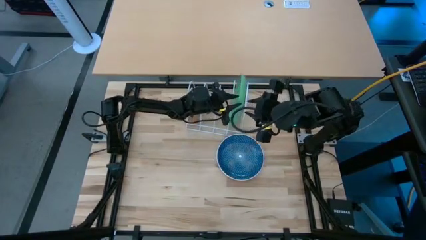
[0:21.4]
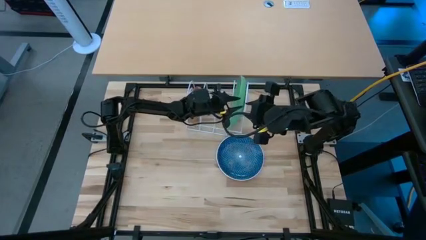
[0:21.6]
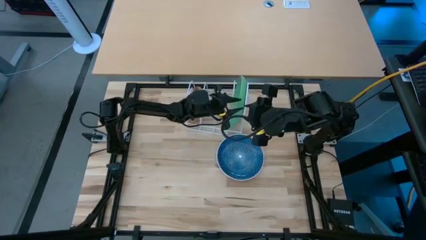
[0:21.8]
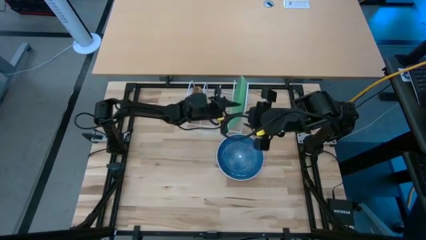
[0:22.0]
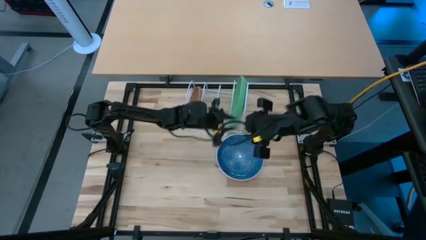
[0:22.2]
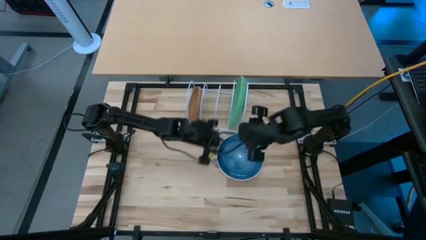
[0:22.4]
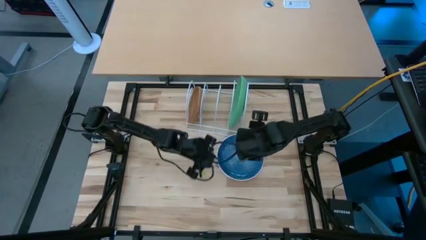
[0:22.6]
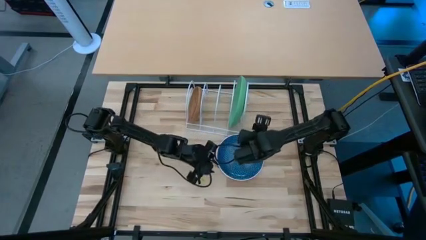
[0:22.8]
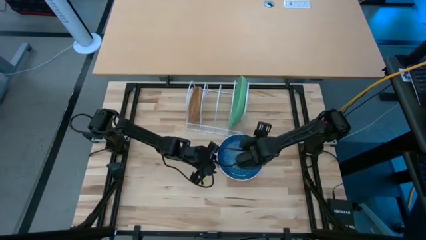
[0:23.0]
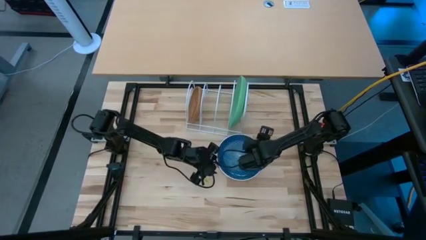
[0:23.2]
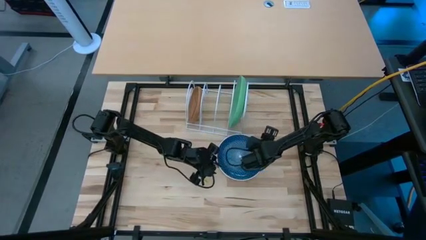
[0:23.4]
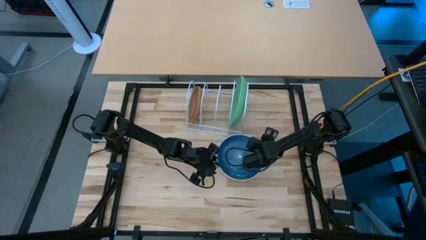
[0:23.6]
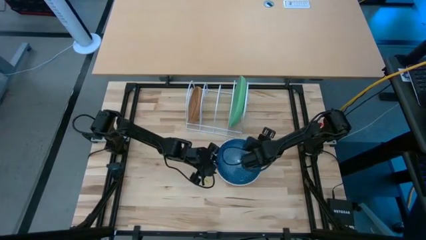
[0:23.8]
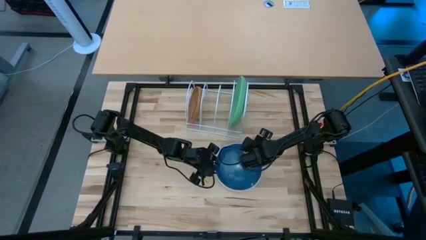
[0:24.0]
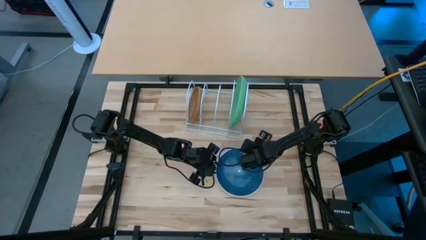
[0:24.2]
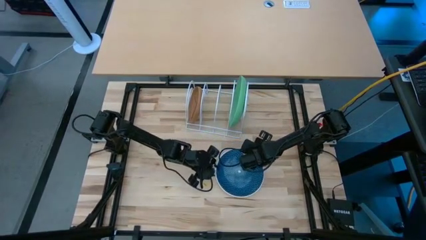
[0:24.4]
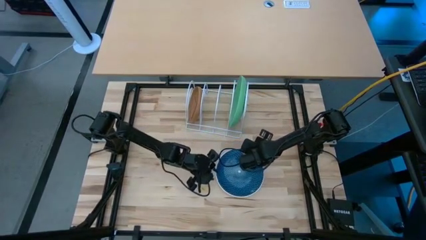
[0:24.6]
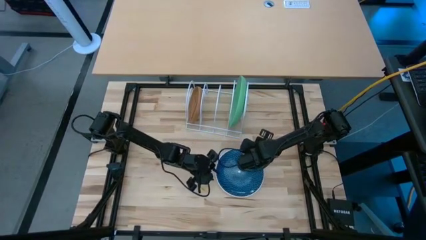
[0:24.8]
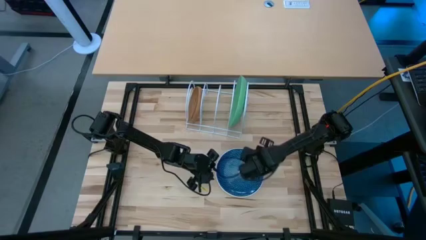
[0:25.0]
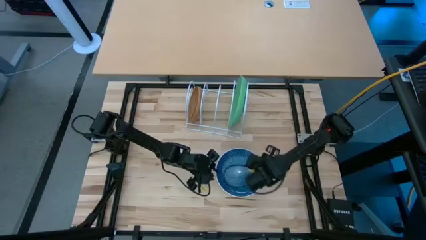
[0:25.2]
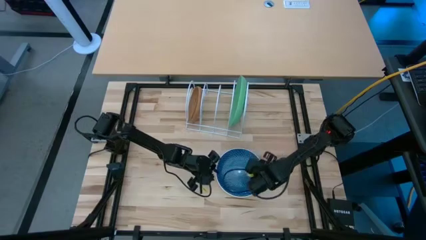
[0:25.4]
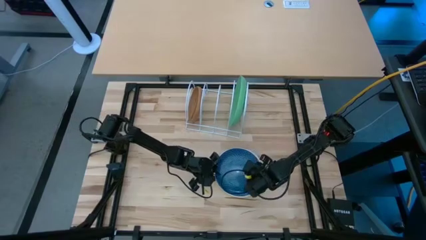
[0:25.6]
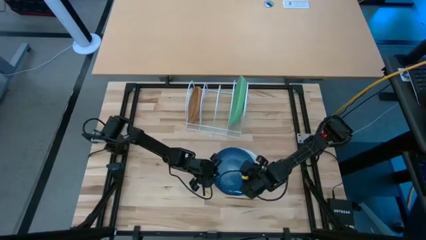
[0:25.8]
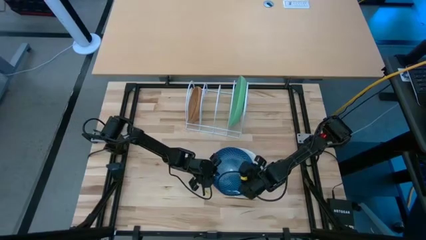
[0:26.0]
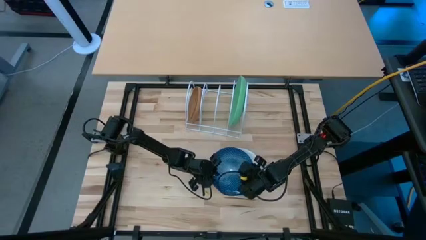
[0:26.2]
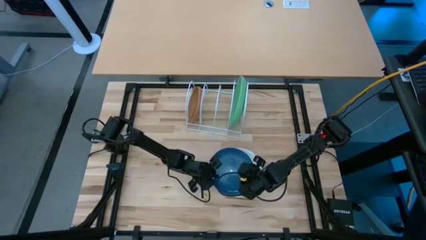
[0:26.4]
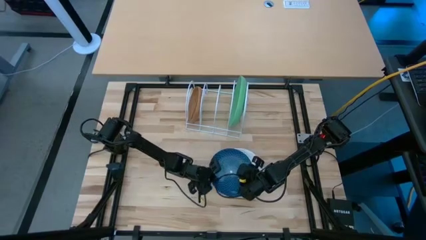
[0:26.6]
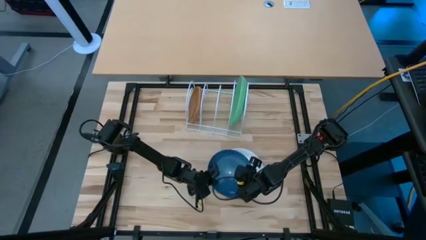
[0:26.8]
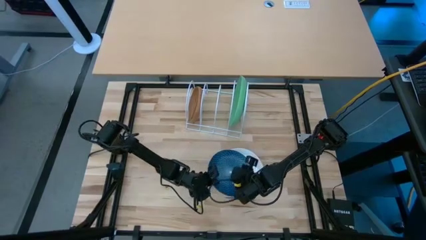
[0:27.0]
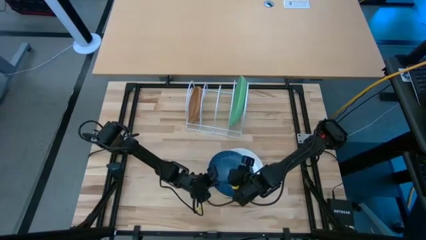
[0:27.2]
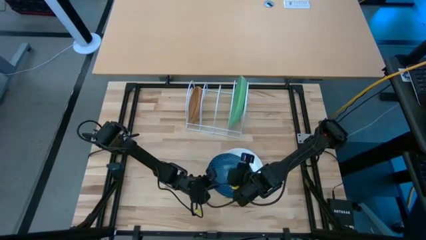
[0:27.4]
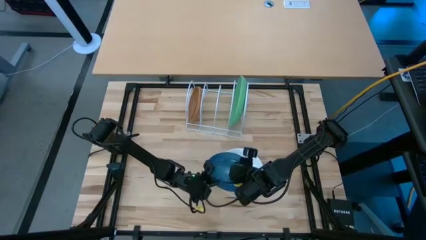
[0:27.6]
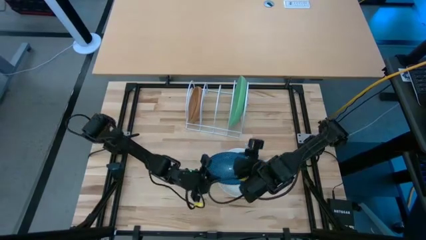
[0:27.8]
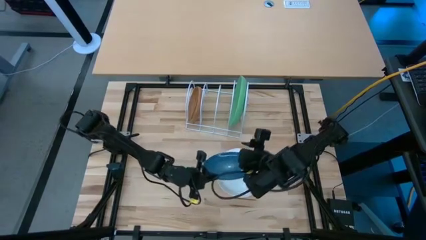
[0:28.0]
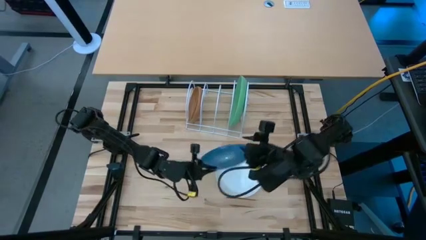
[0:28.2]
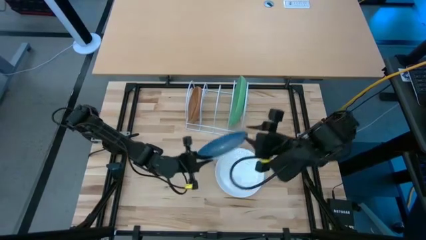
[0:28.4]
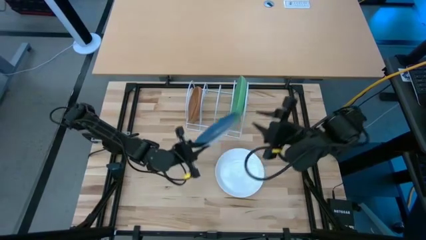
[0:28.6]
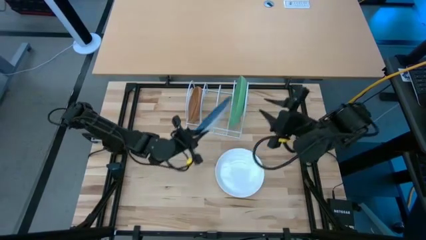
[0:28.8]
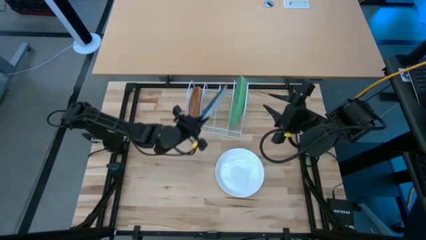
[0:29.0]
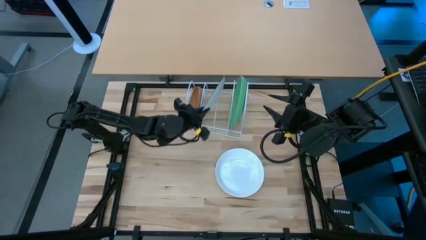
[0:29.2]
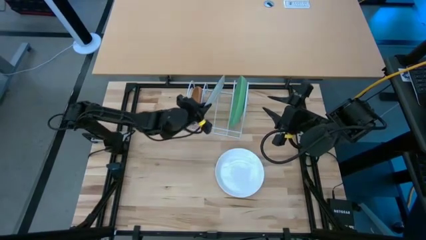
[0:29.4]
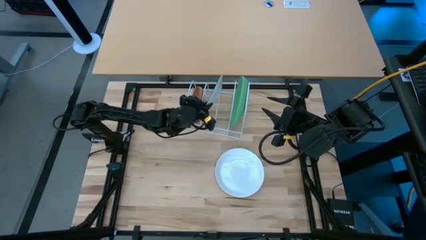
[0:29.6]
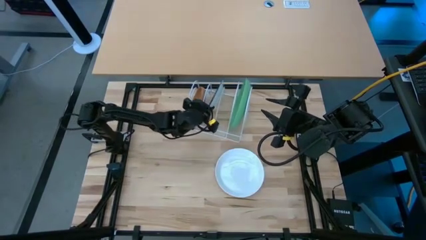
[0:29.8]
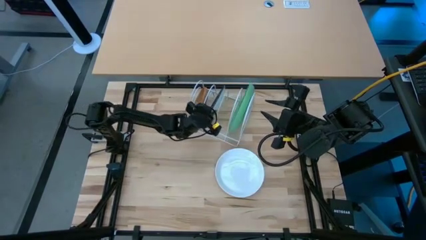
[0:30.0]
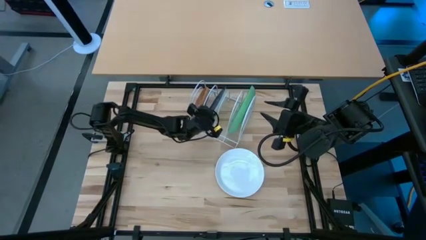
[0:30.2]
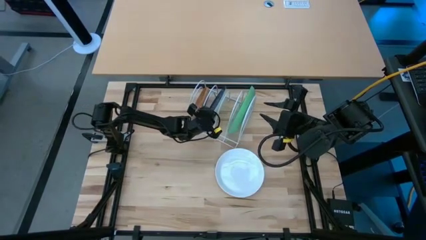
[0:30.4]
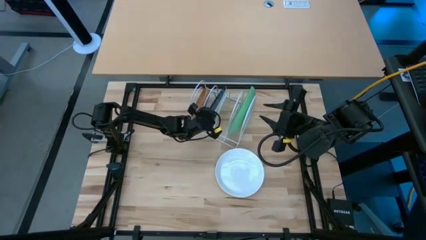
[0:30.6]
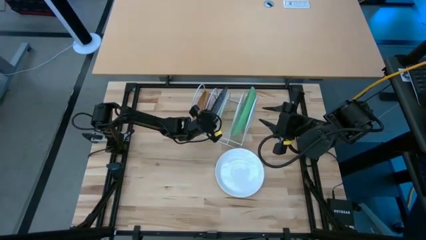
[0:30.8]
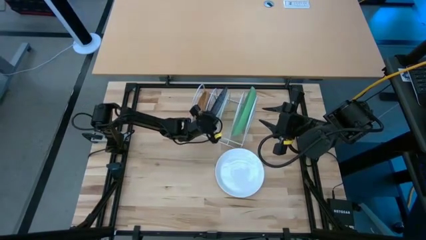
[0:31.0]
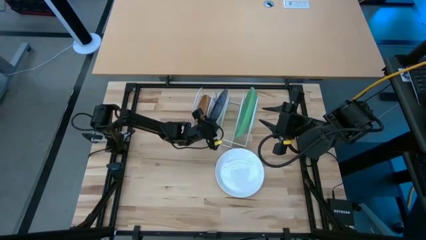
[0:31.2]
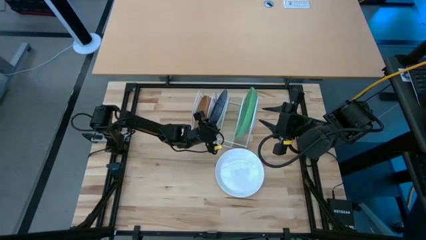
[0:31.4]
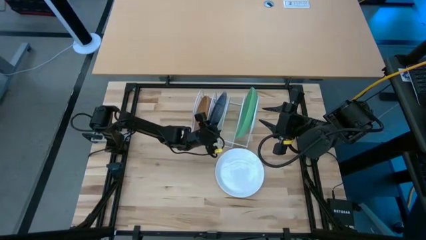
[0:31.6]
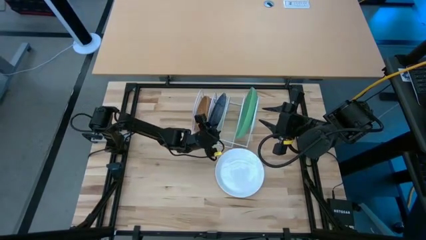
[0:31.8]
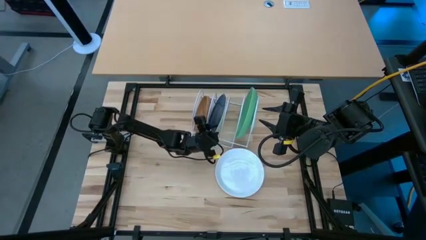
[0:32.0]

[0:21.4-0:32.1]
Task: Sort dishes
Put the blue plate in the dish rack
